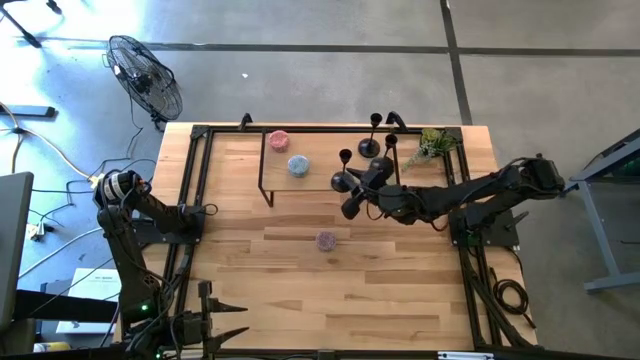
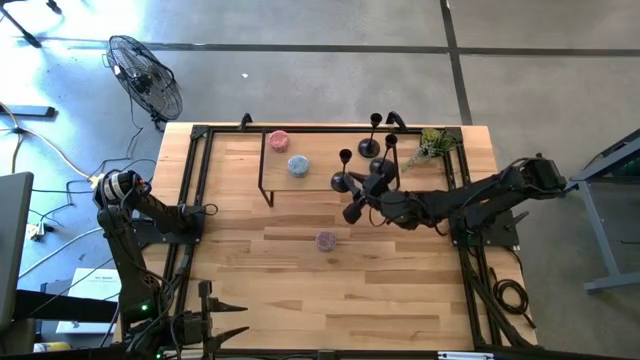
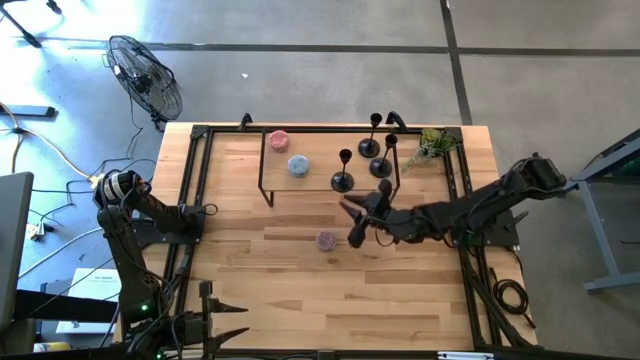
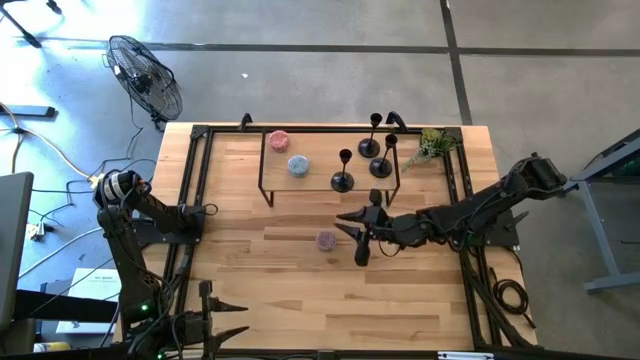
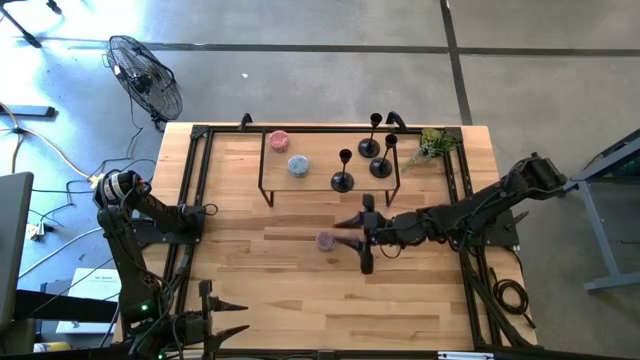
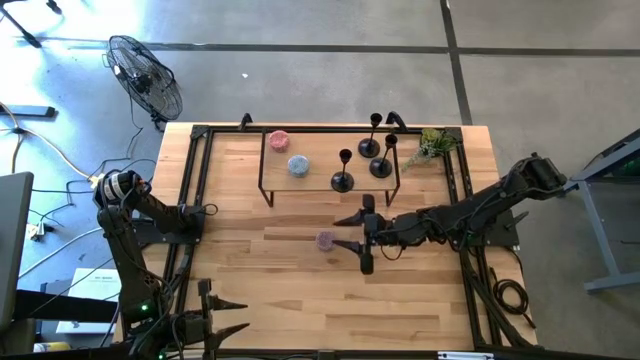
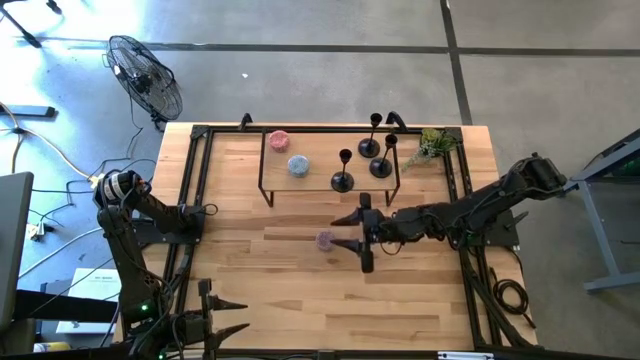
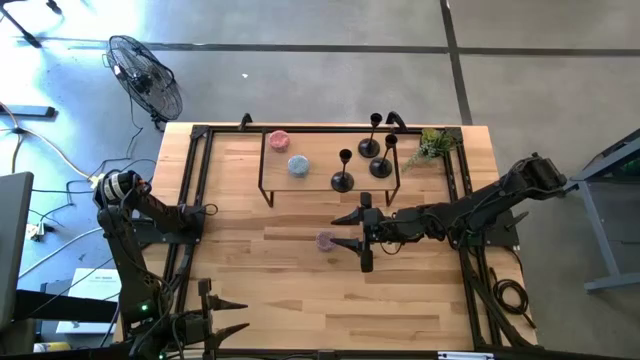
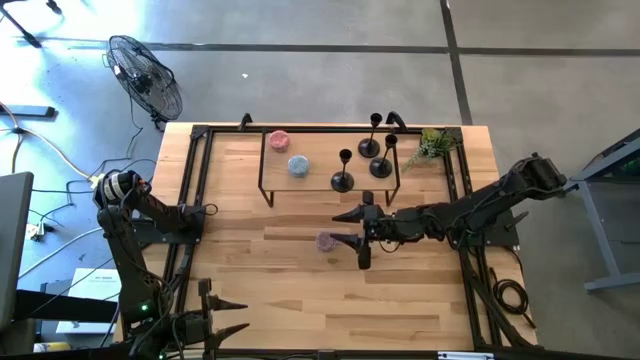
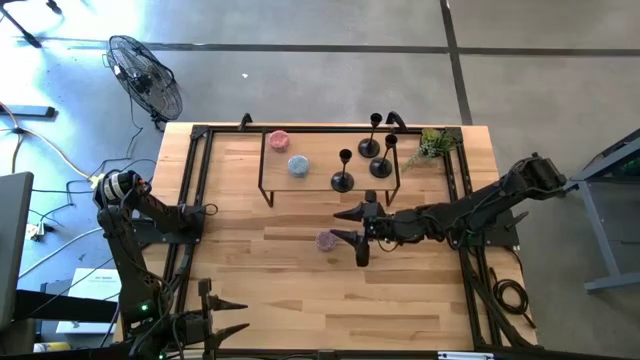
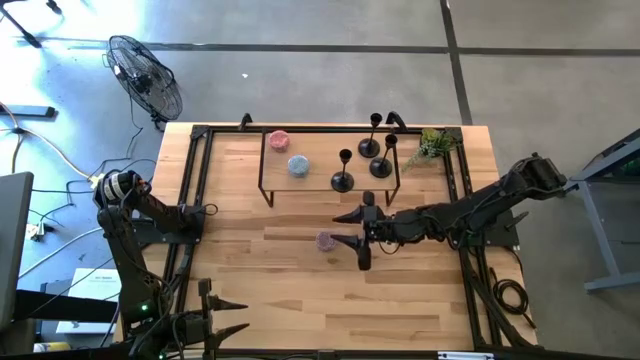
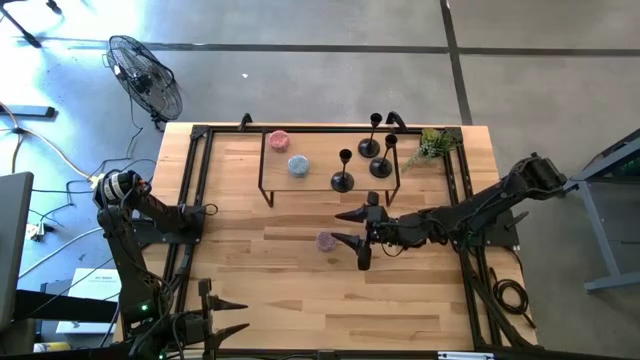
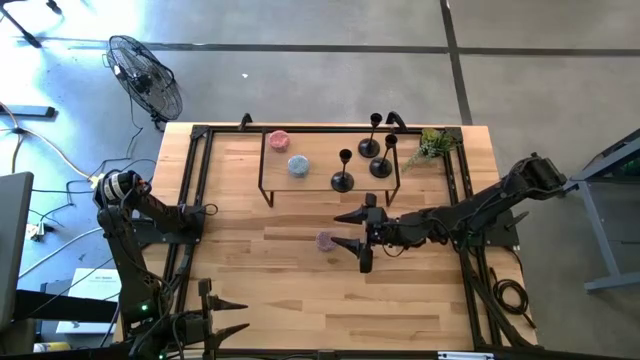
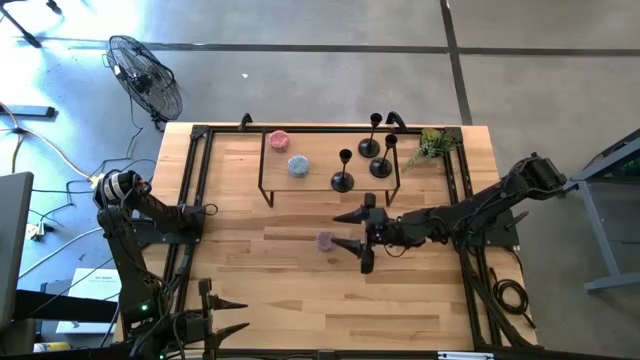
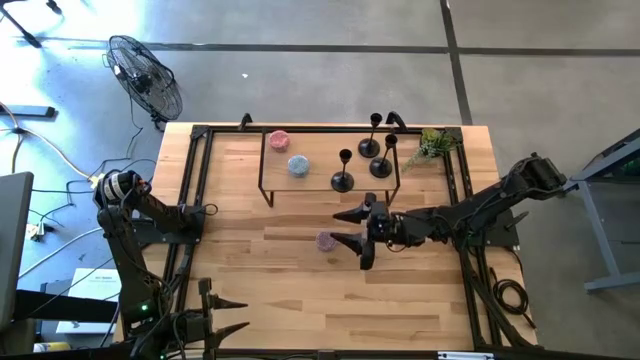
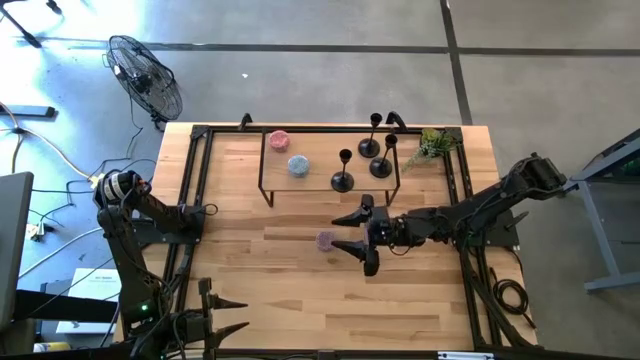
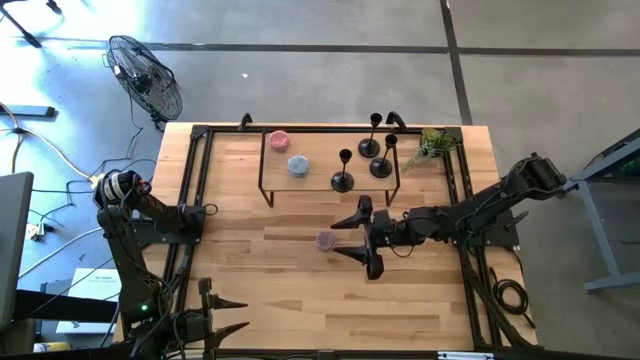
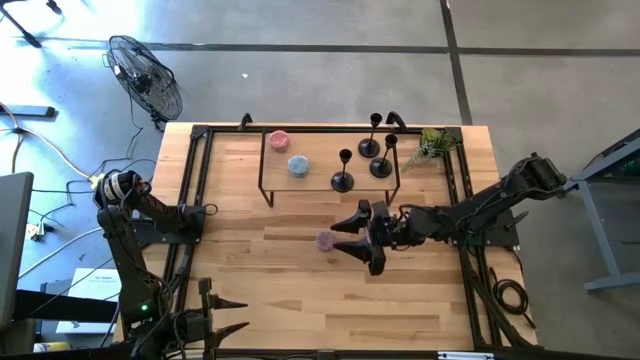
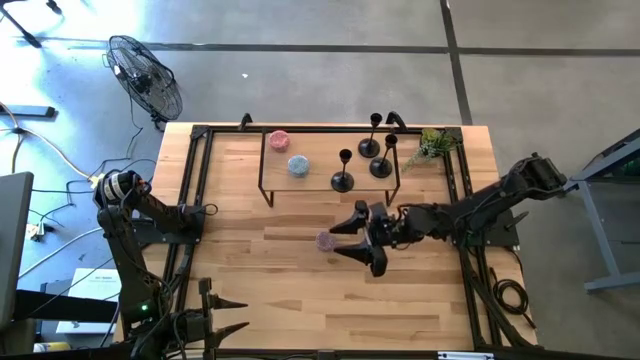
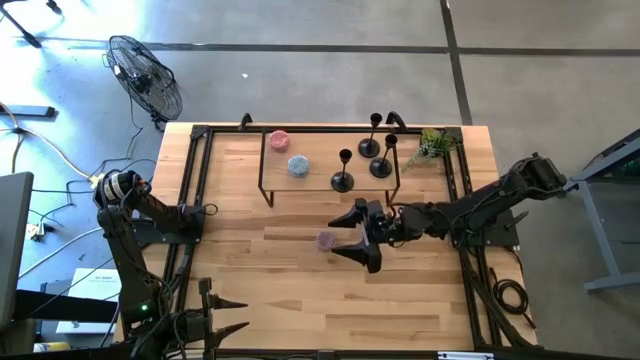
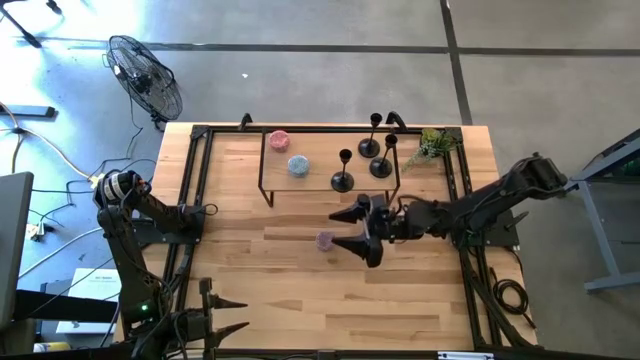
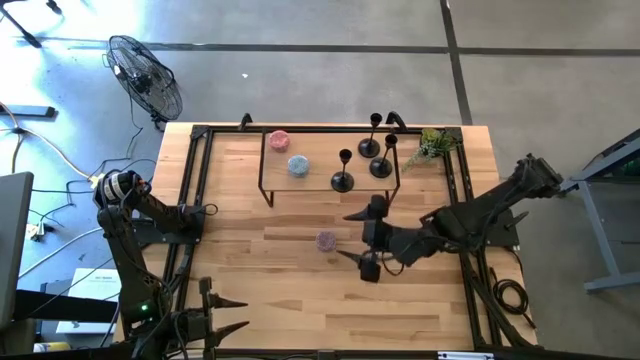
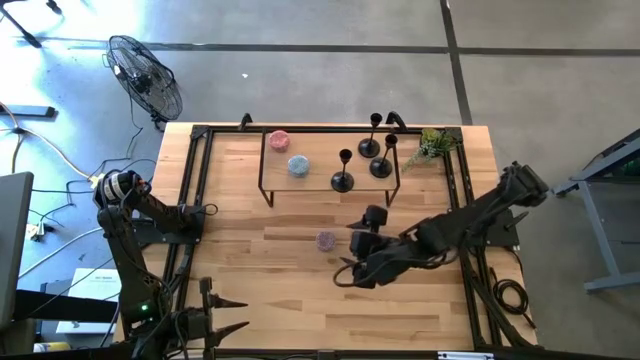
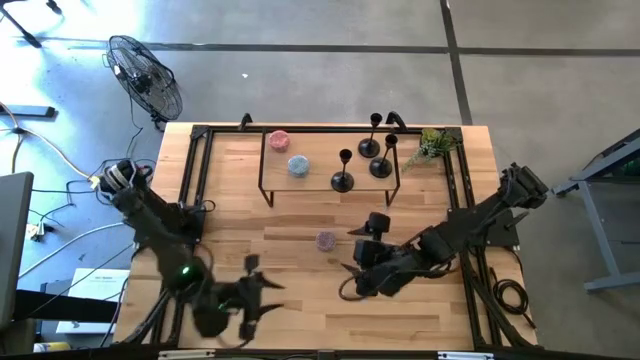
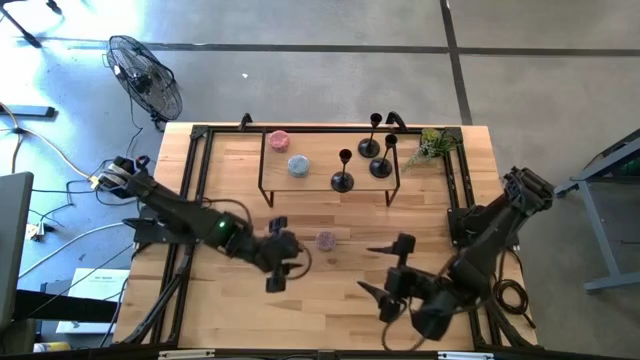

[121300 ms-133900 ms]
Task: Pick & Place candle stick holders
Put the red patterned scented candle on the shelf
